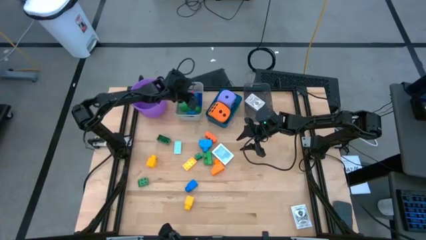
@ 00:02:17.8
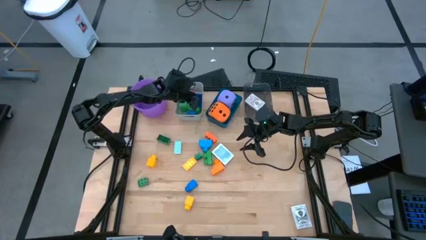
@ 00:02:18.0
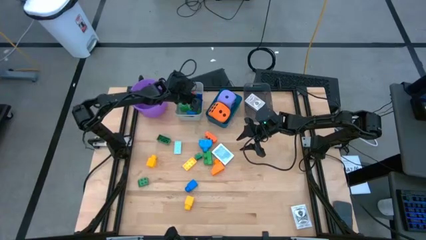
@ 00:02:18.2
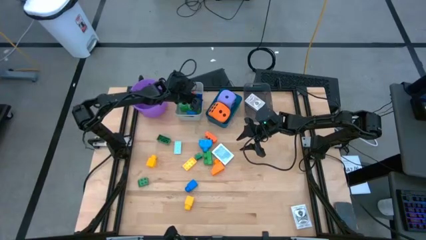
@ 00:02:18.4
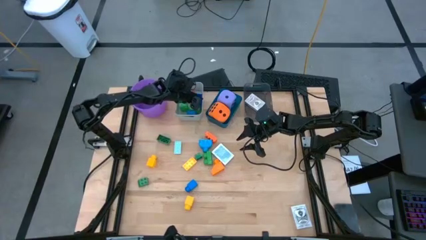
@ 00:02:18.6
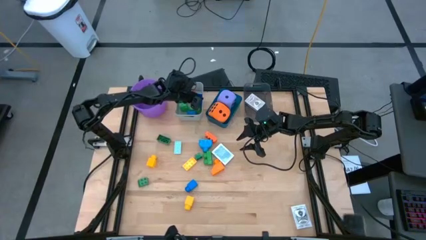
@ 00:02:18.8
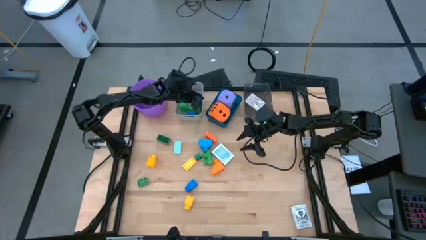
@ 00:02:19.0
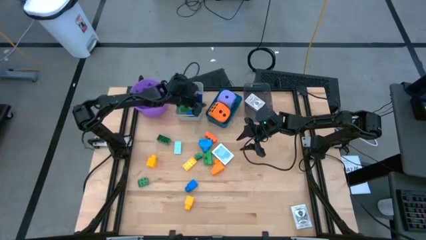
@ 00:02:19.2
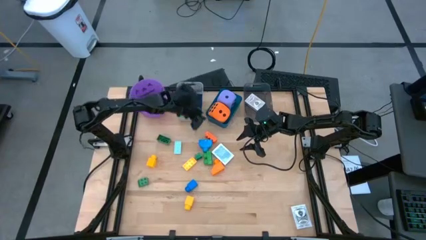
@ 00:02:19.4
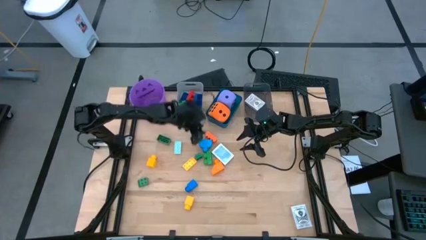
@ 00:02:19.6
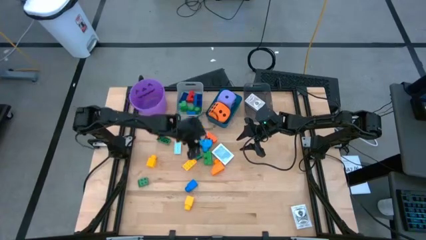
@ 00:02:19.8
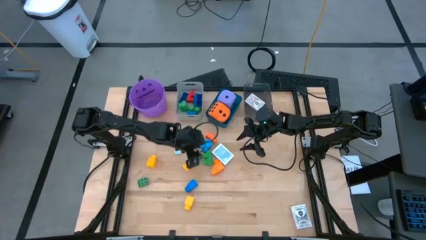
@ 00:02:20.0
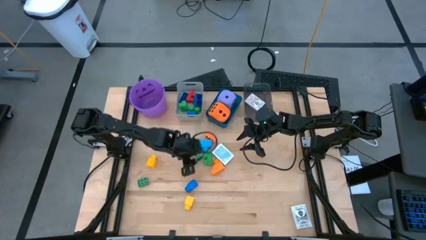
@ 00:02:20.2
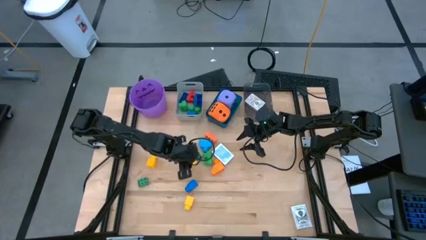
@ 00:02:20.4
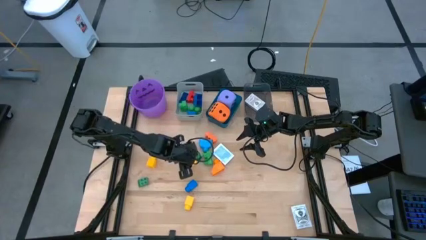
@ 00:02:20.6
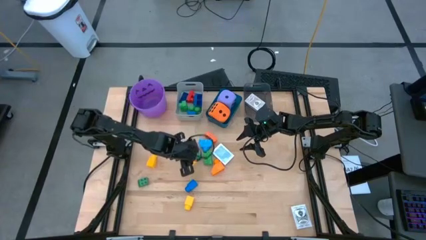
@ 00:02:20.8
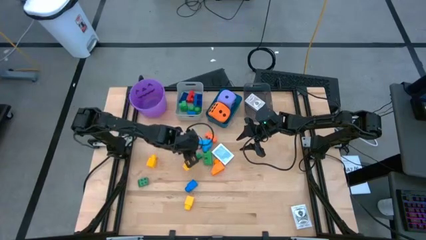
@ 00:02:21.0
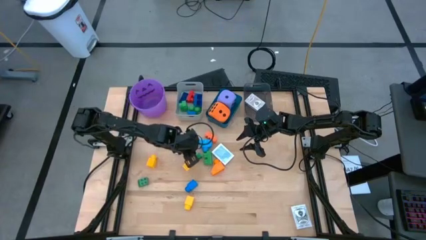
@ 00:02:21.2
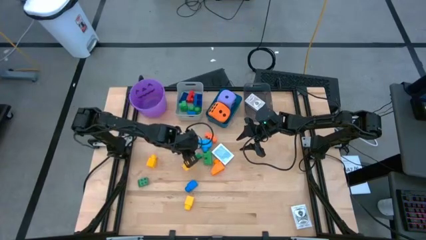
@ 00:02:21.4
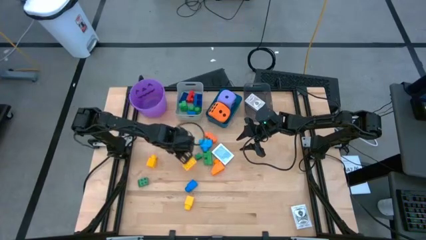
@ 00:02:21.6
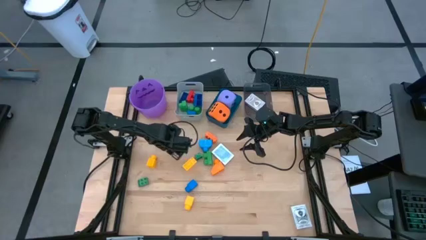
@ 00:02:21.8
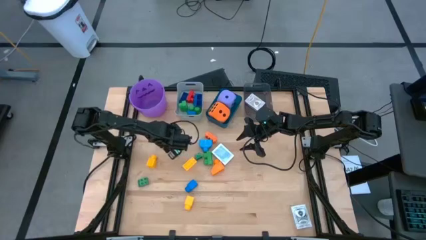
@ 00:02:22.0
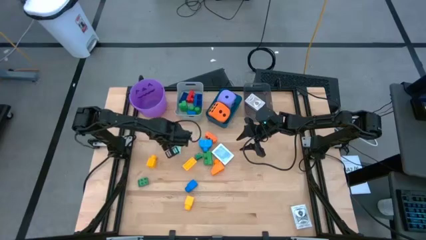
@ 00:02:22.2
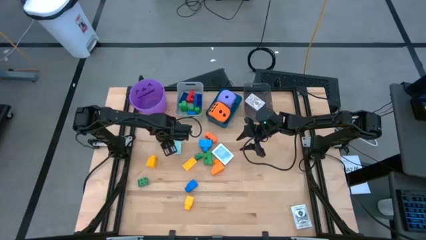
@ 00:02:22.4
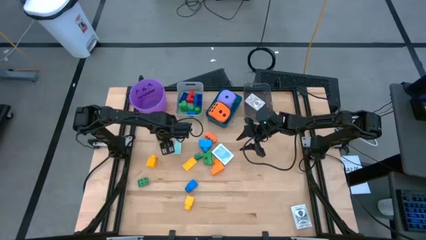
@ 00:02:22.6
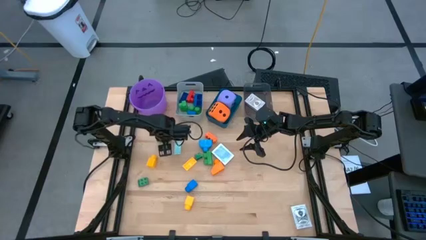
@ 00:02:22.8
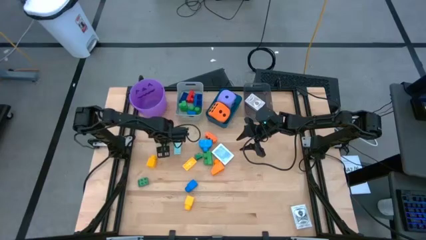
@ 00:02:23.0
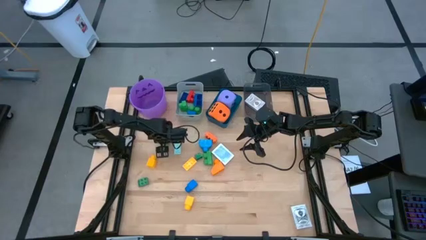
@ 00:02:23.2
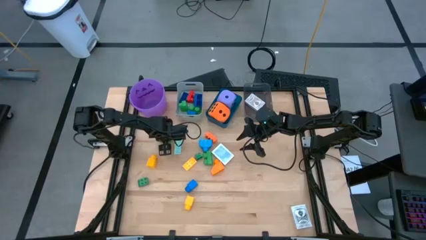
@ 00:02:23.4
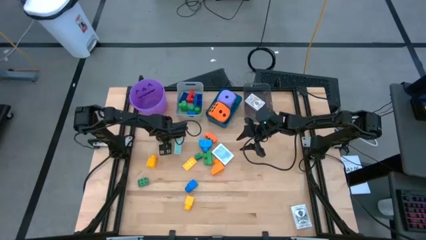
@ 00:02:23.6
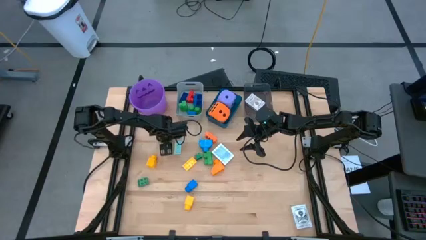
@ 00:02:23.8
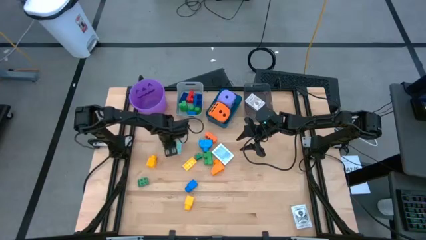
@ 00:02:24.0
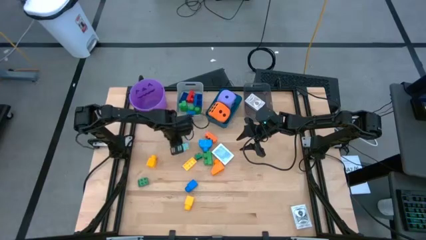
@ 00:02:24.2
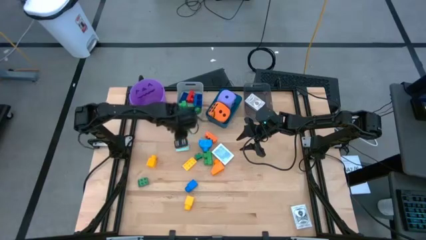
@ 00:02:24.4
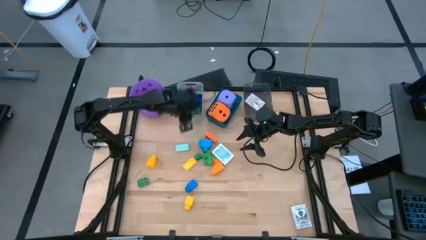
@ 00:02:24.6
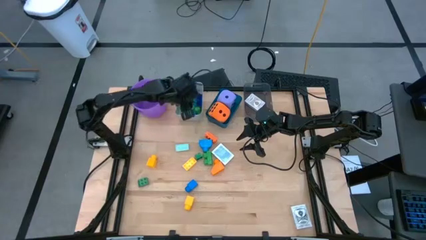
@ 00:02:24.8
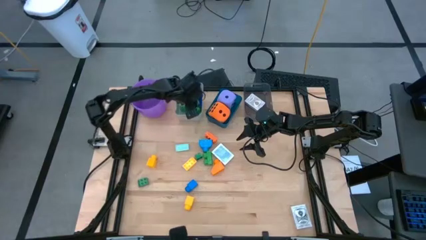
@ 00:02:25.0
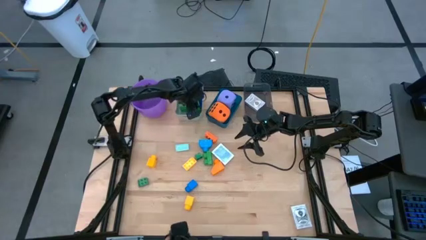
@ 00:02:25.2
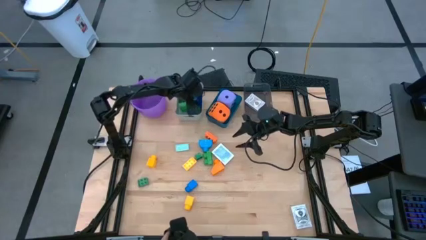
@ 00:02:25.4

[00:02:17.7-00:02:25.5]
Task: Pick & Place Toys
Put the green game piece into the gray bin

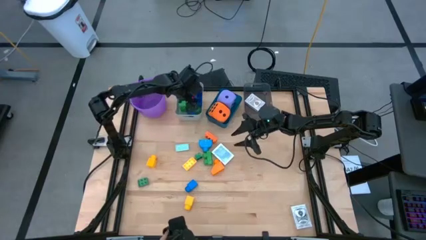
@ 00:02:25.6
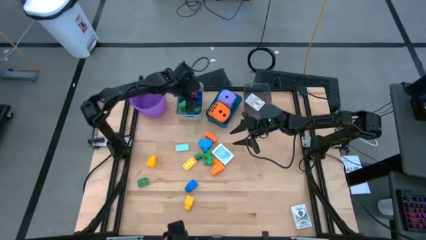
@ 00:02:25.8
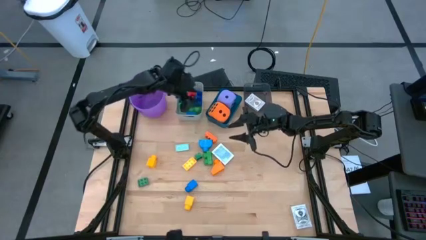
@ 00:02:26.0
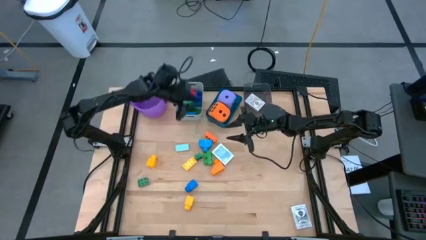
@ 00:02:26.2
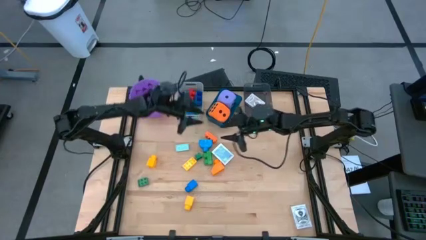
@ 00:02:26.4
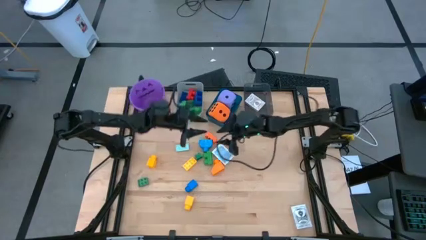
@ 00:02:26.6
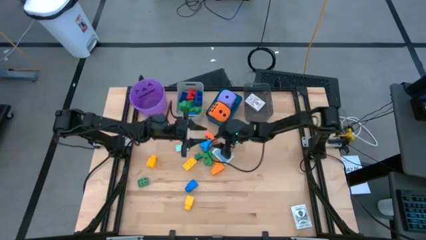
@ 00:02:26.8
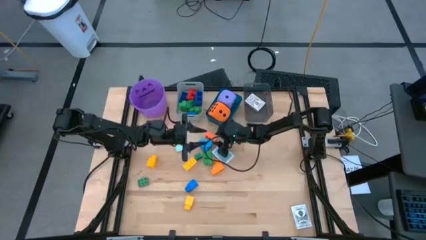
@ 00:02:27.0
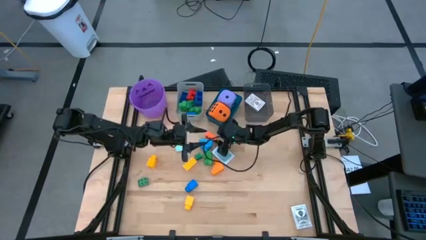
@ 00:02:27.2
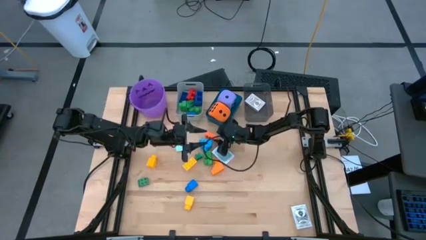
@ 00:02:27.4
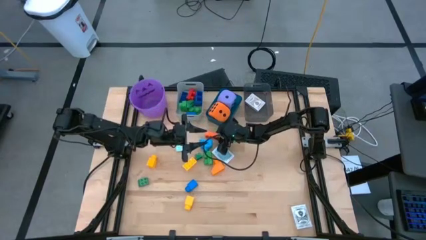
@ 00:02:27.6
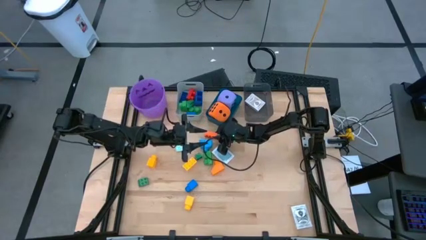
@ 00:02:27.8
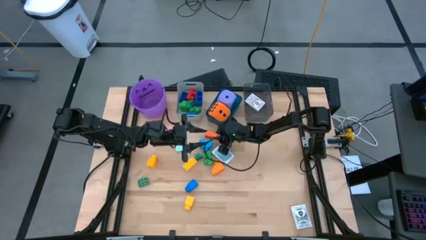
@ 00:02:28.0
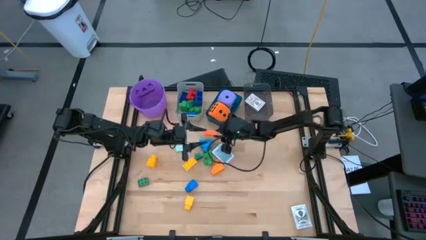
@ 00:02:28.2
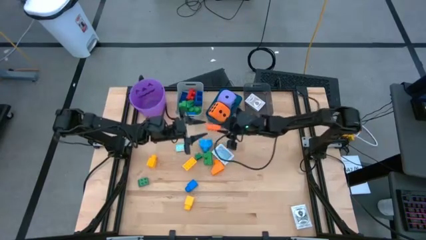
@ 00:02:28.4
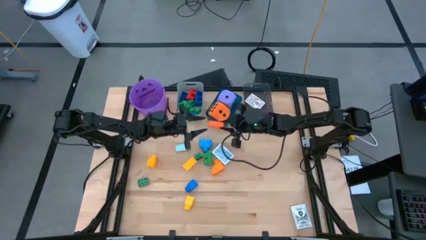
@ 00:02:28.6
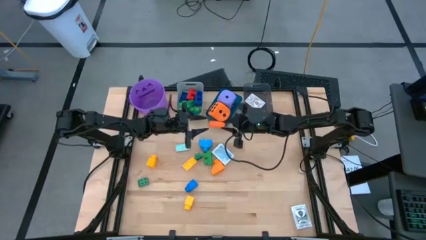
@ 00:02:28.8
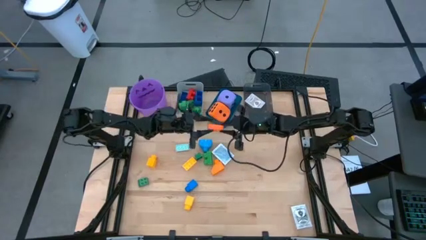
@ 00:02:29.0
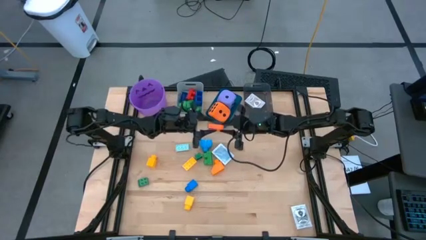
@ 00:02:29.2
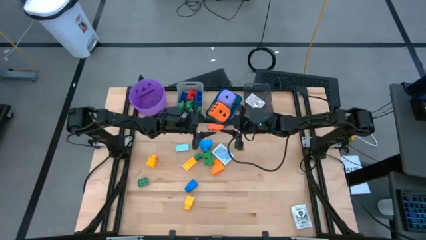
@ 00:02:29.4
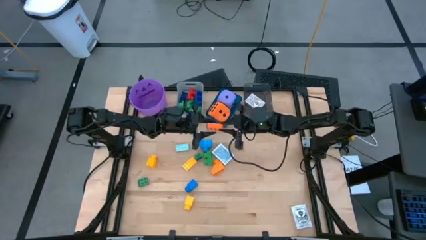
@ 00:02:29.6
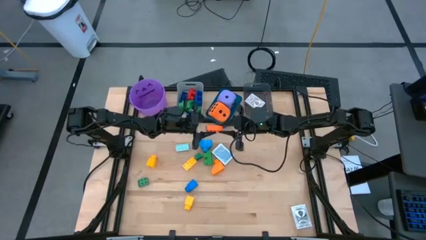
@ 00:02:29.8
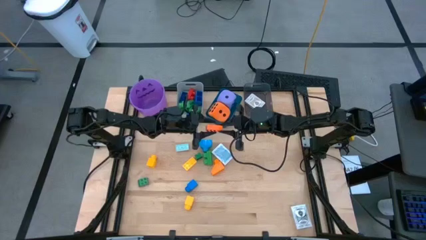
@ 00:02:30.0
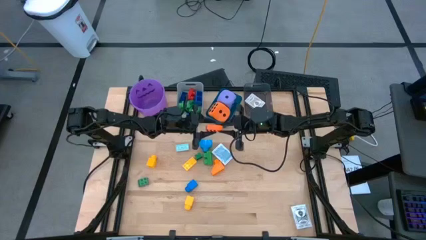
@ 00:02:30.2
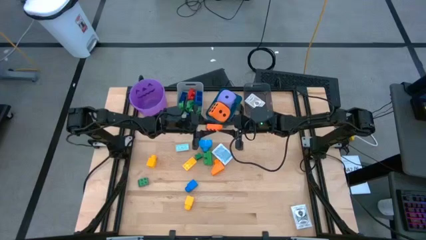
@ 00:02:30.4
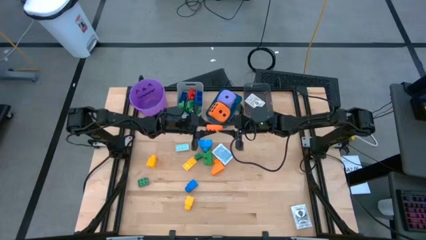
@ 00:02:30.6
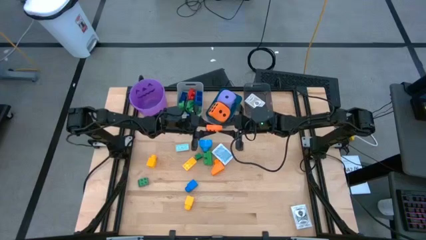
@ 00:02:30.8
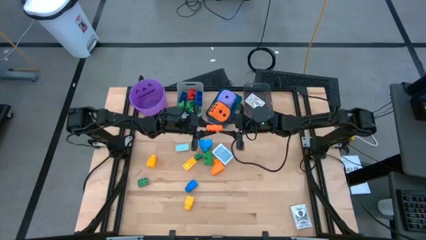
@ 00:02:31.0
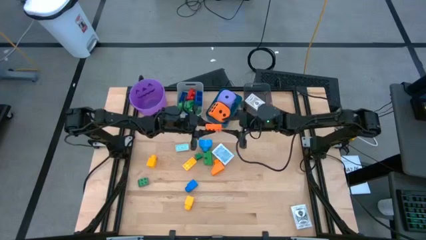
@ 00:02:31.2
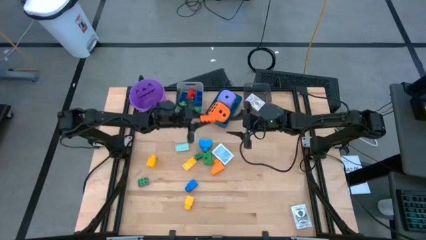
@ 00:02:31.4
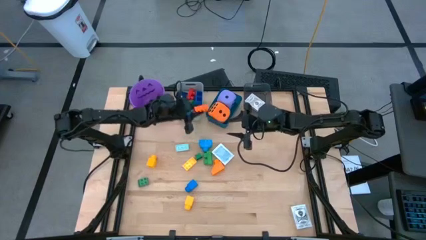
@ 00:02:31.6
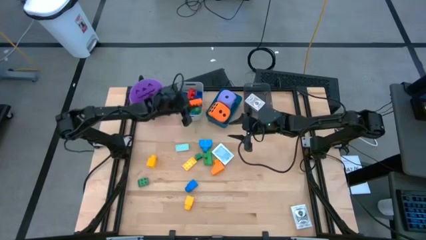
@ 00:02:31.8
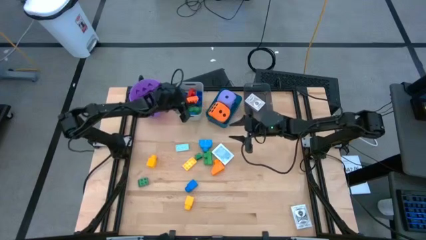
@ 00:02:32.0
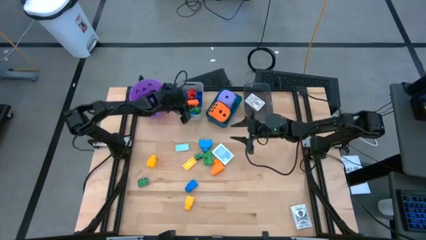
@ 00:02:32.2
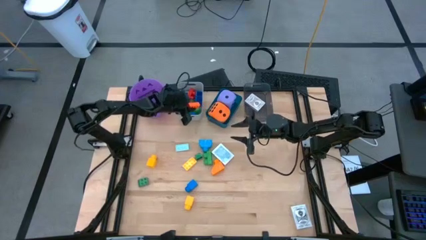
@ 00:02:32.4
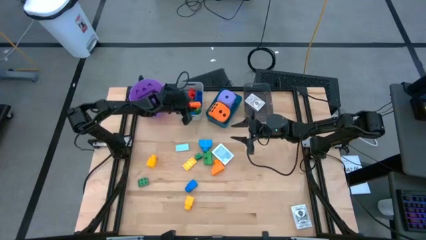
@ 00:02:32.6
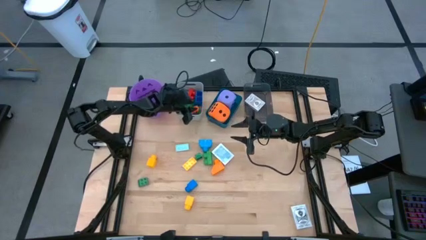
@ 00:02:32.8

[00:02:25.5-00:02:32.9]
Put the orange game piece into the gray bin

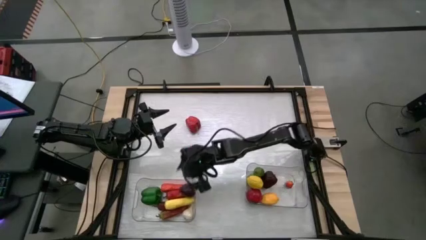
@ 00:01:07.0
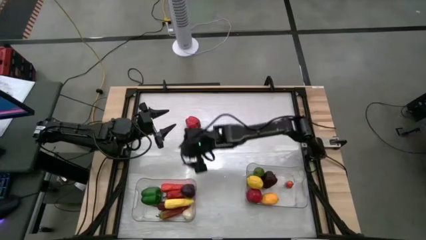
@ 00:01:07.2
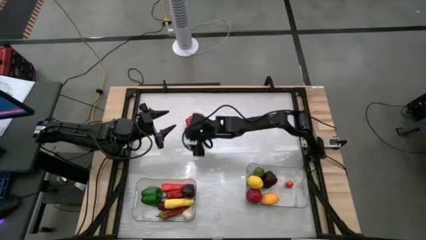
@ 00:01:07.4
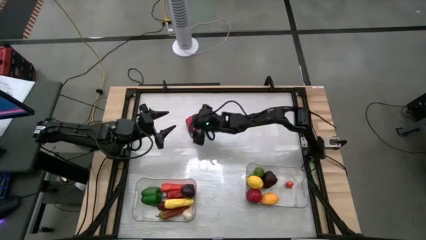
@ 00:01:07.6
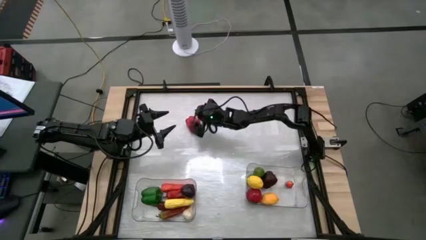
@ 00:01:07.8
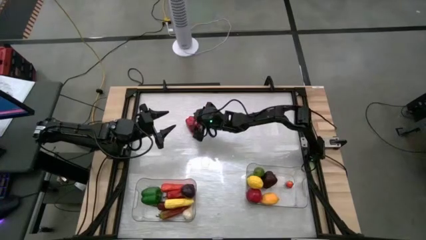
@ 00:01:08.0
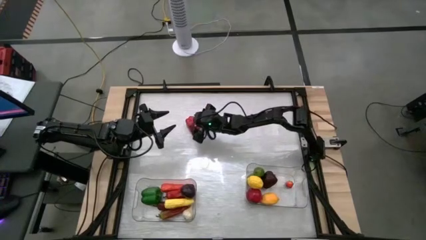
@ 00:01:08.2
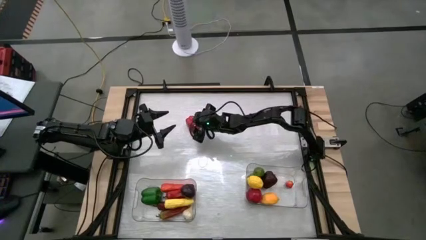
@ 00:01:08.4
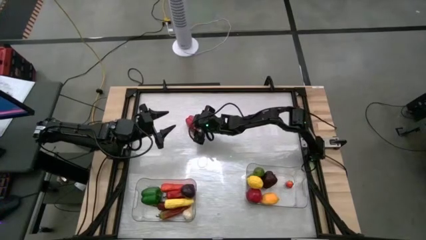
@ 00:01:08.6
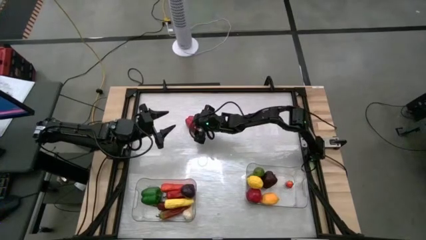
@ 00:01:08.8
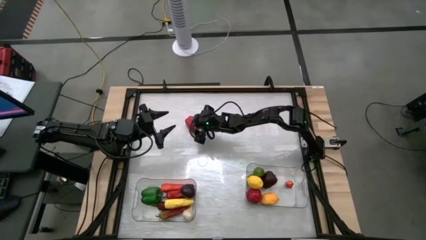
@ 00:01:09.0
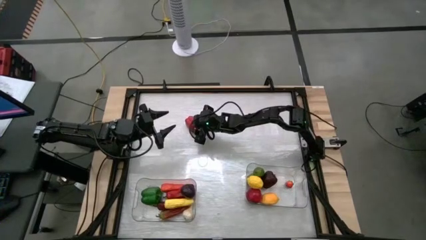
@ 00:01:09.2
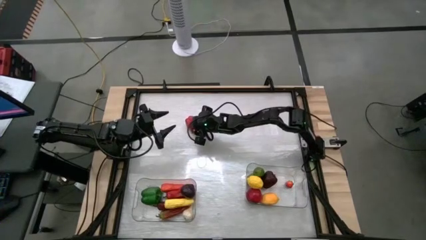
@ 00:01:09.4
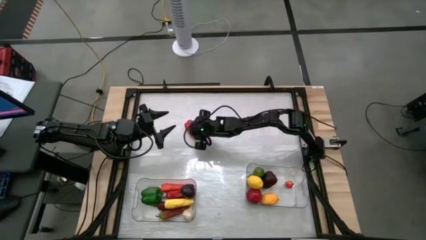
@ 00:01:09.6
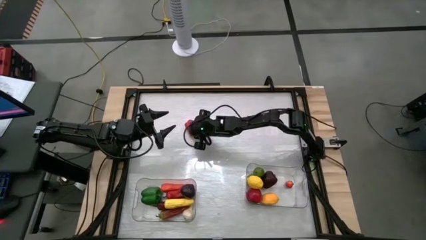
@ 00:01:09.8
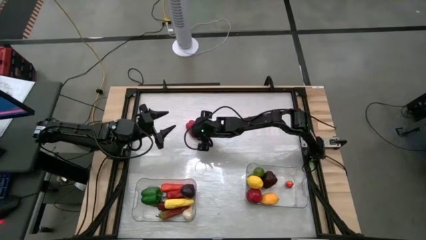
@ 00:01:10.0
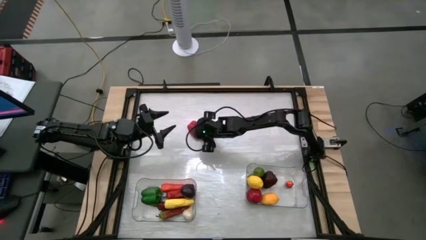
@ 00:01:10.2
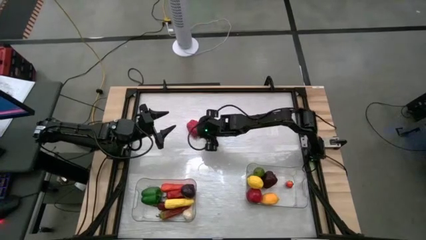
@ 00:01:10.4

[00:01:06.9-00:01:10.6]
Task: Sort produce into baskets
Put the red bell pepper into the right transparent bin
